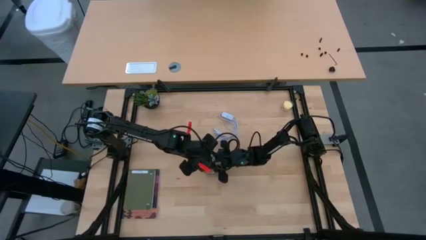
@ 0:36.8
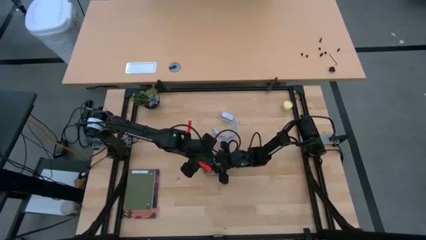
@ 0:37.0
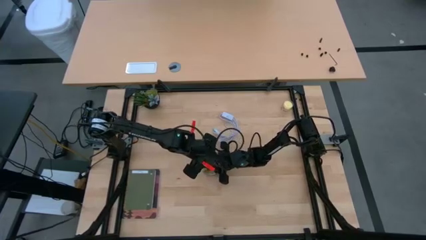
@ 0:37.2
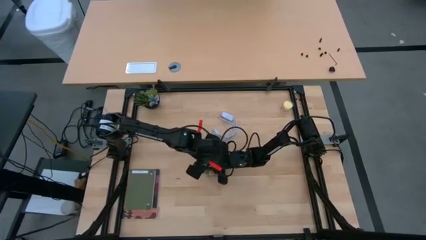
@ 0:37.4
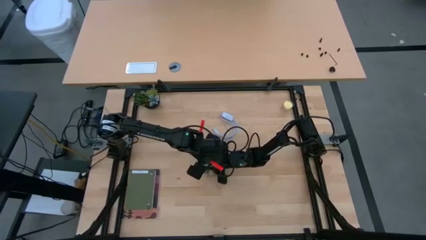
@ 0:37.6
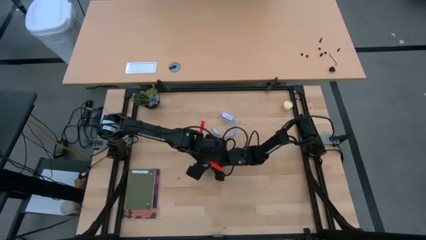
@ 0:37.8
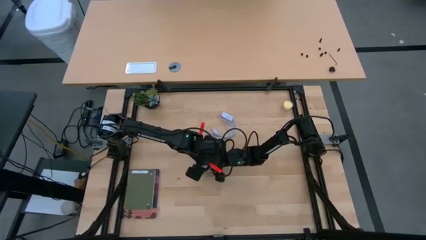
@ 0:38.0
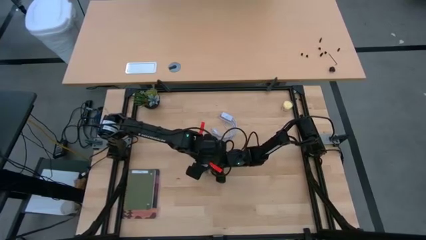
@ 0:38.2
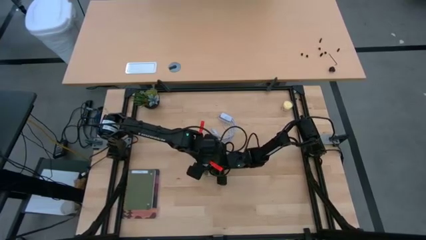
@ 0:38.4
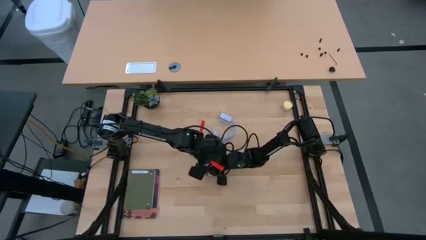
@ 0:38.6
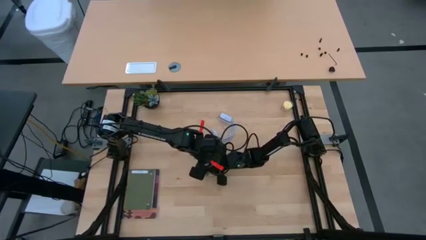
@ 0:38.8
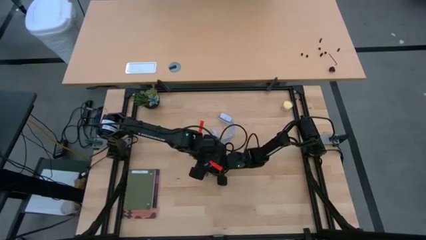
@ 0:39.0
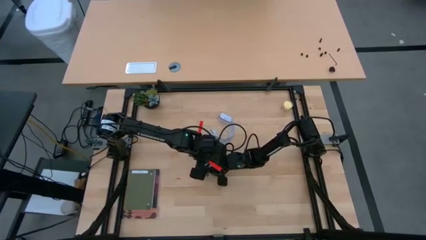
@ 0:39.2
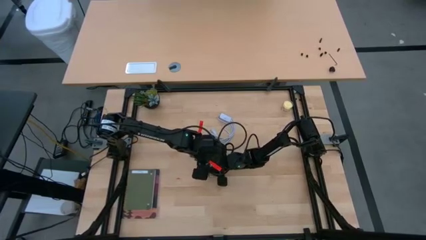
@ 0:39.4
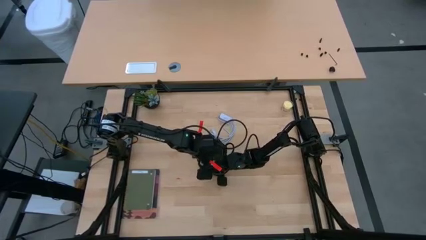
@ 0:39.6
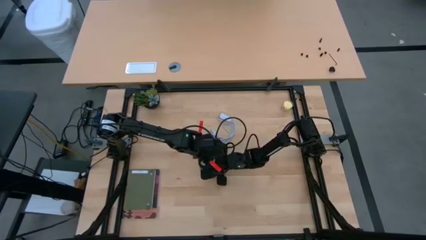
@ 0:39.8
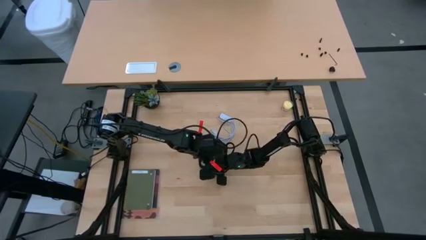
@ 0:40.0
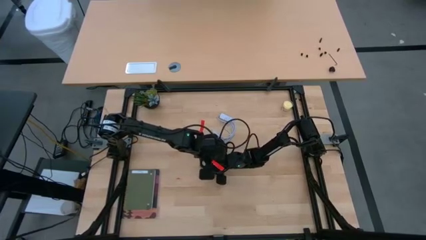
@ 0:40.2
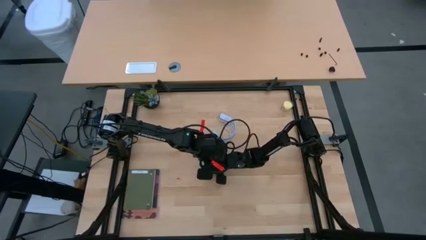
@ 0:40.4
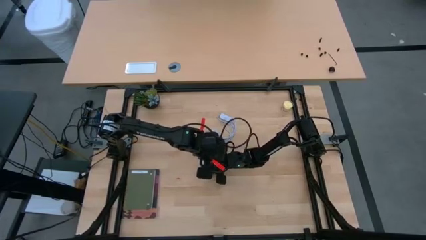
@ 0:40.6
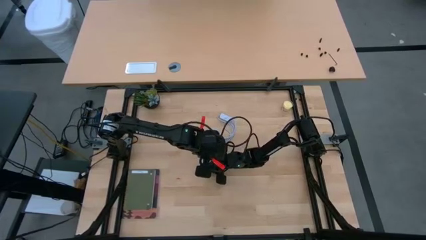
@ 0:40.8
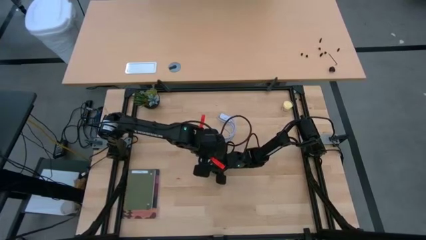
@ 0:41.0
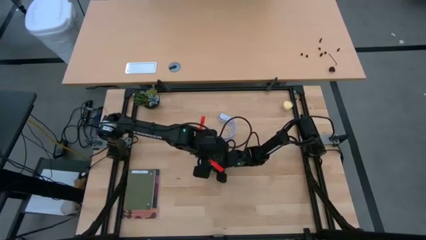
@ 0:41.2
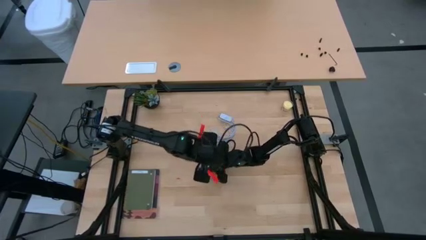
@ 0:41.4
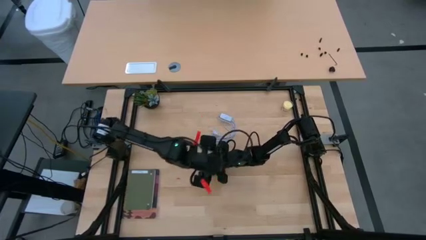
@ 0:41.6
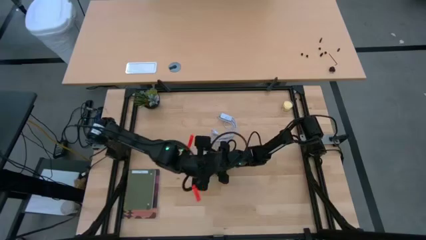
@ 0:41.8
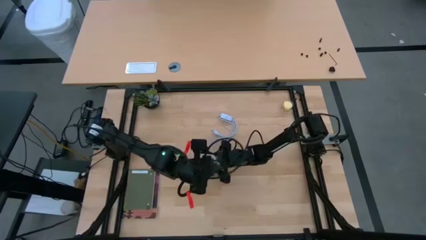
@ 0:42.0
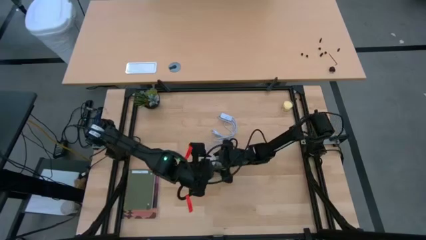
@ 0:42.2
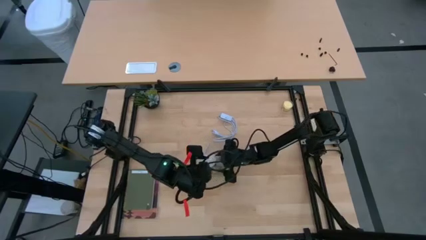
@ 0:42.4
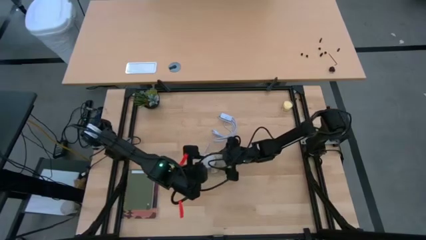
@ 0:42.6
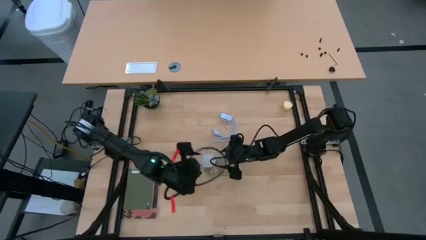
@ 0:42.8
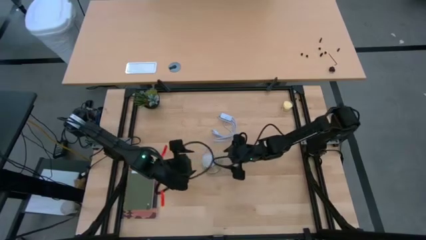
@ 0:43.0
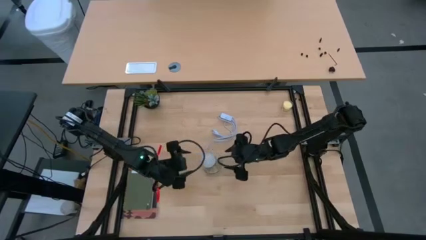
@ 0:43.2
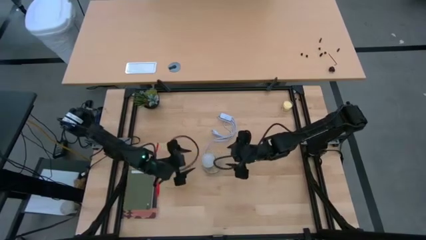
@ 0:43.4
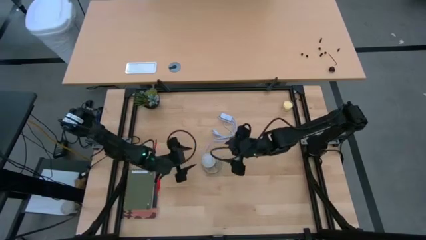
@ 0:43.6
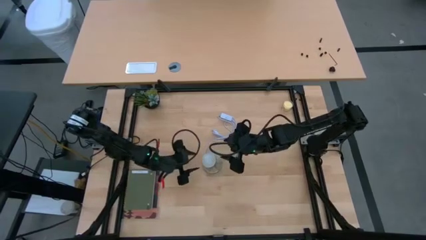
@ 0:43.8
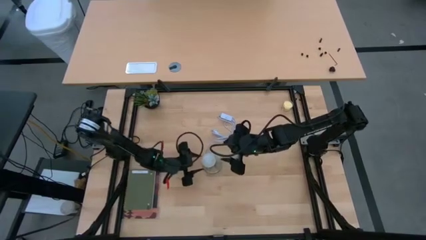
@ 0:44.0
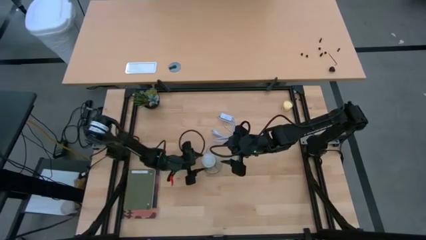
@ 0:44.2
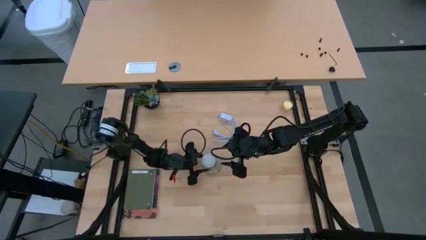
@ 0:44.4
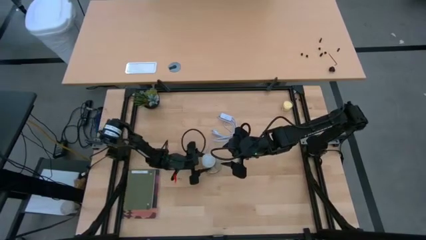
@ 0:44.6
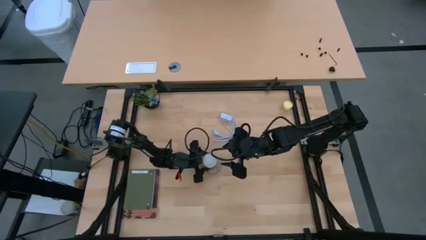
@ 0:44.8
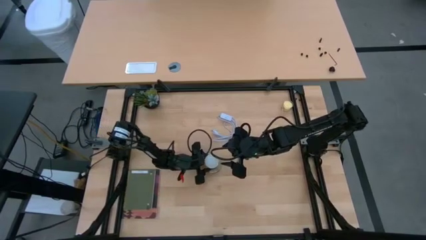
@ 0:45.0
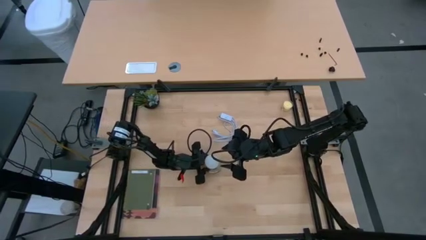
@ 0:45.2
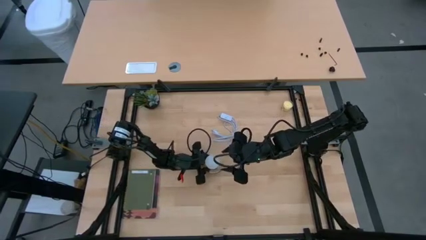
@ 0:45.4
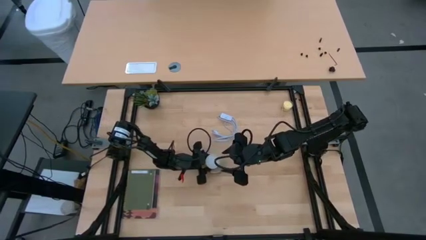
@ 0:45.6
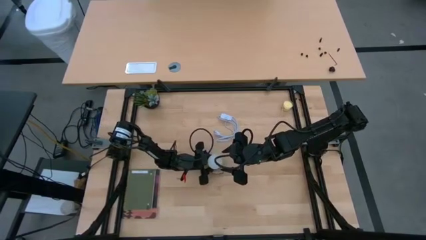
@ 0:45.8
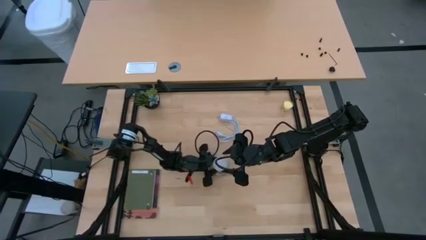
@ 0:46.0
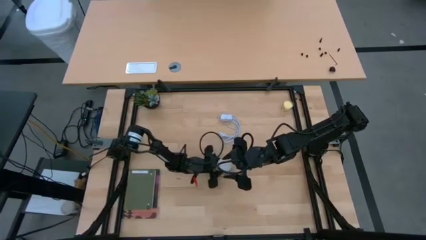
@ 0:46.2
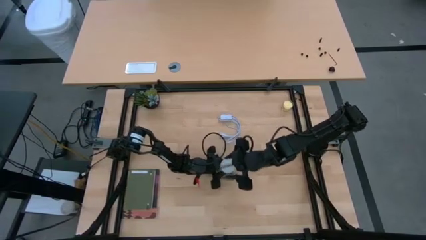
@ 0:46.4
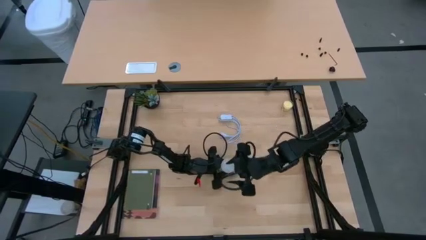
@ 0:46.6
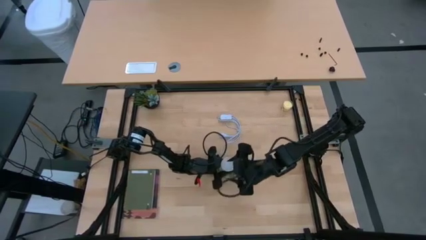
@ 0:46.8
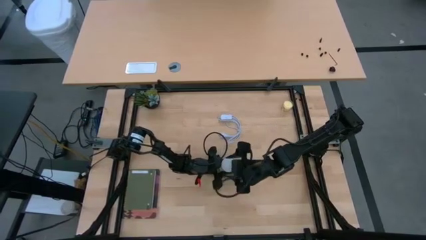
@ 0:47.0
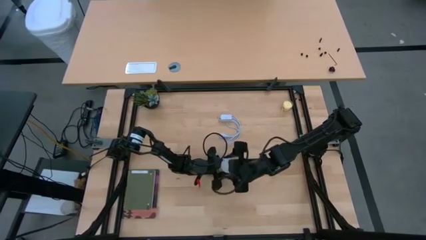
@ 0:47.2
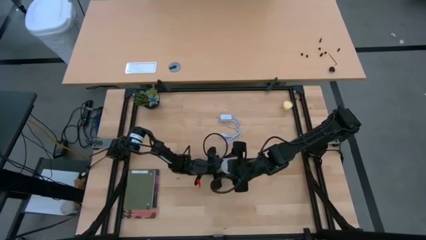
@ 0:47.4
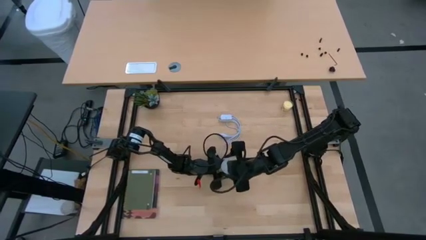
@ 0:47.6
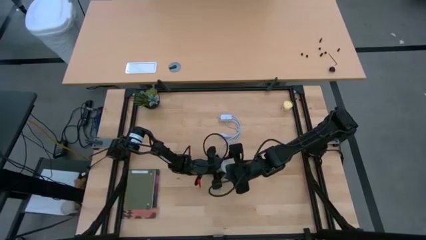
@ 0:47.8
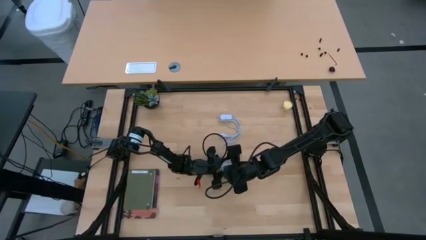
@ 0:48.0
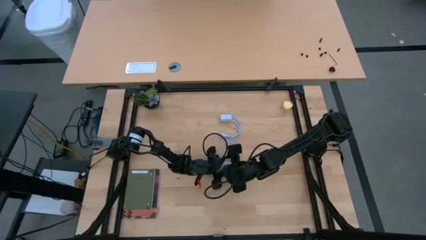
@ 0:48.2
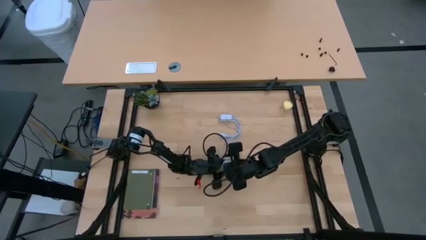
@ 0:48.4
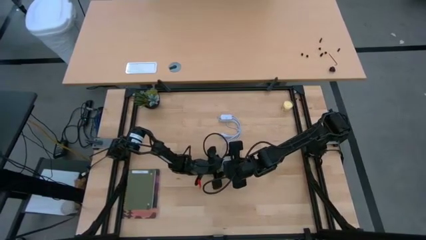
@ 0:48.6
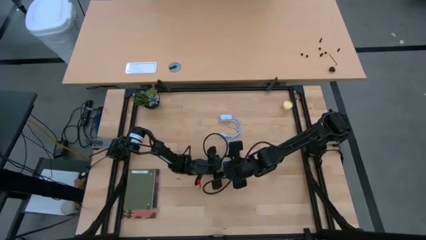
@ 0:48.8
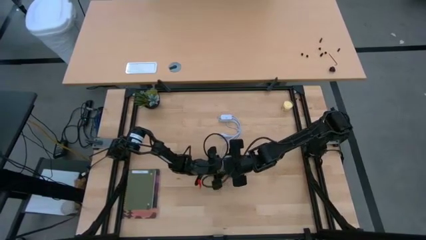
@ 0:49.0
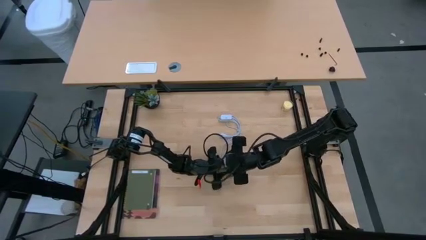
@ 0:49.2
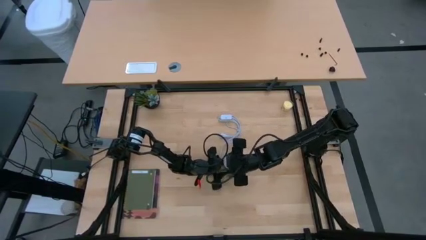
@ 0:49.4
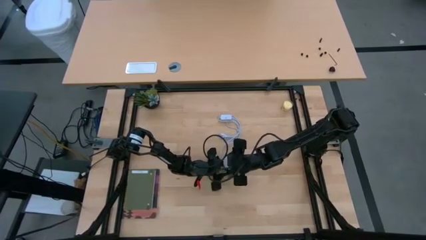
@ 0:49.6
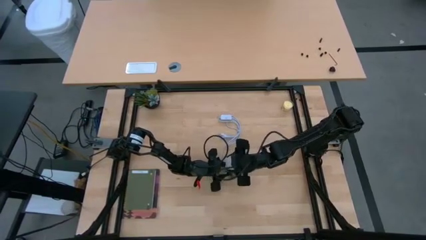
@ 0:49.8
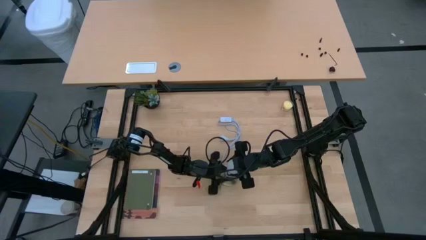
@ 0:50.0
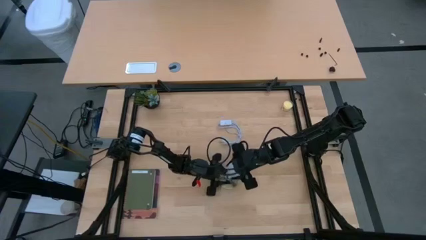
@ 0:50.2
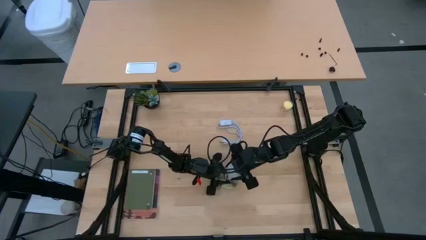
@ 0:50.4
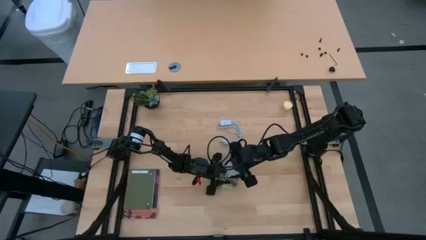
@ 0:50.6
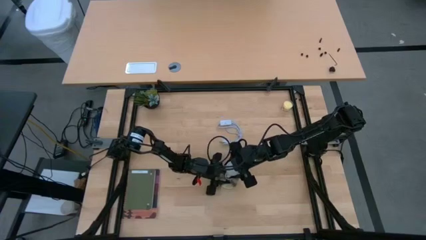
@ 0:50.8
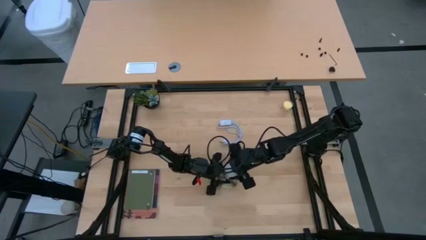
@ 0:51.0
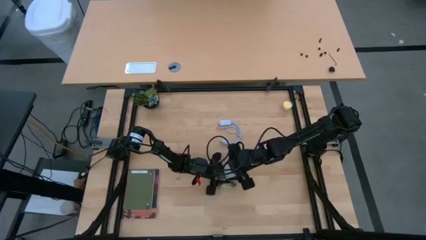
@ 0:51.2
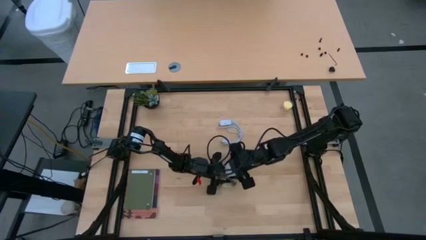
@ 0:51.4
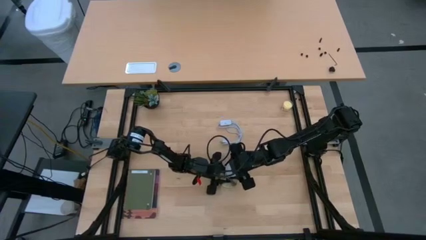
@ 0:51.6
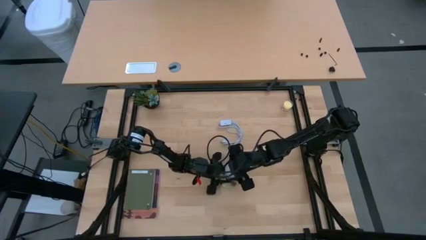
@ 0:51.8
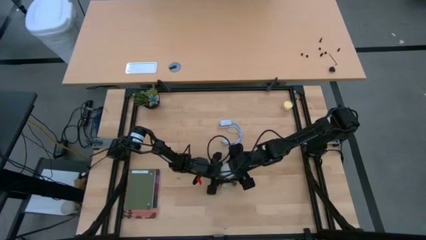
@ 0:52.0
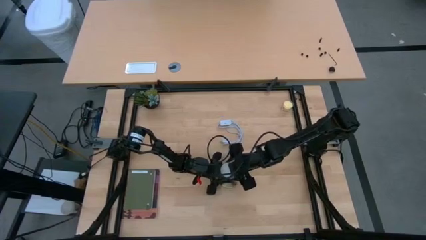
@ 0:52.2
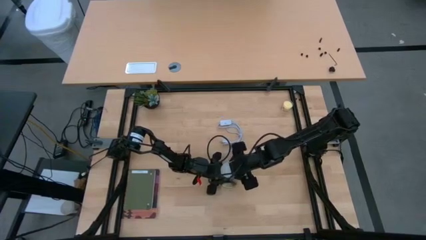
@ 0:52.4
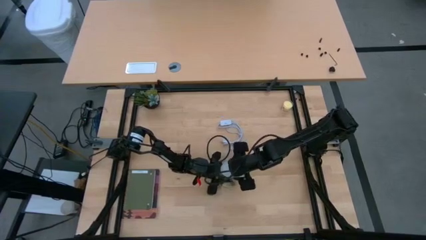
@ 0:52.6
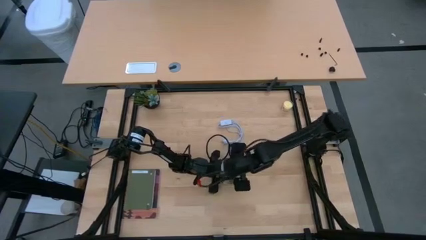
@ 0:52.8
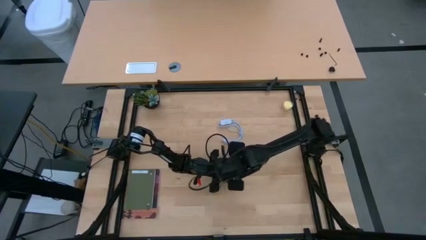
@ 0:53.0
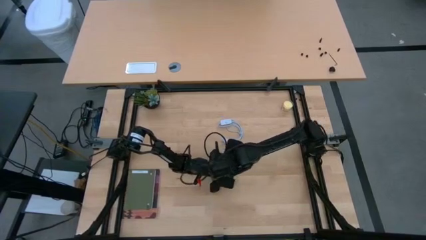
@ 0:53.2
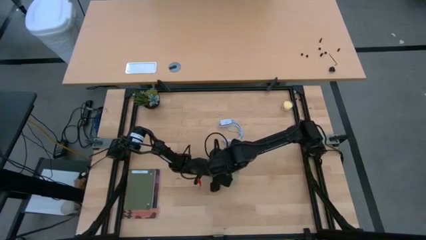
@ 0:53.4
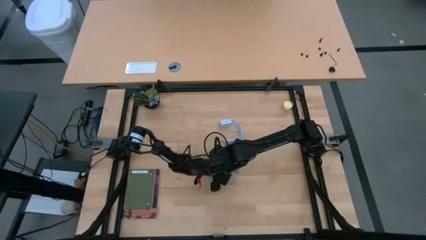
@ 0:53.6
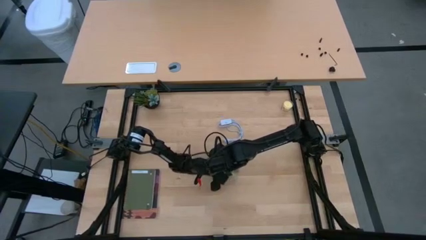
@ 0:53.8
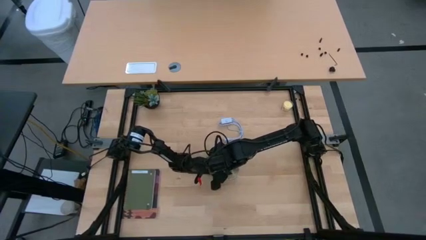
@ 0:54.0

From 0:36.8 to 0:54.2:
Task: Screw lightbulb
Insert the lightbulb into the lamp
